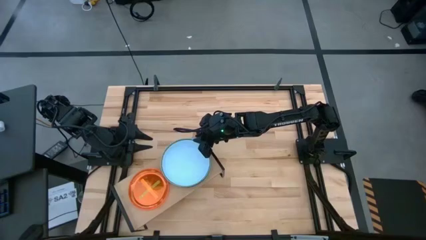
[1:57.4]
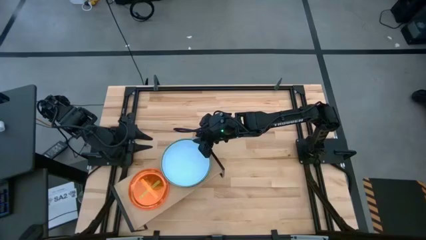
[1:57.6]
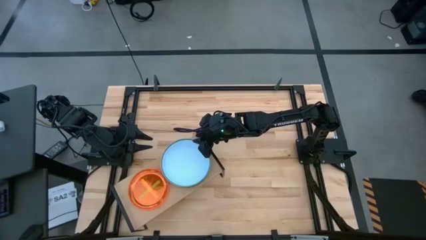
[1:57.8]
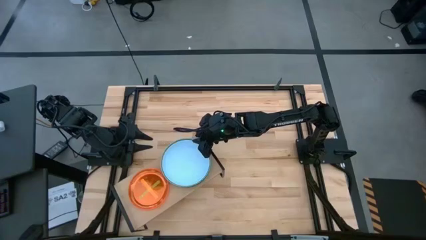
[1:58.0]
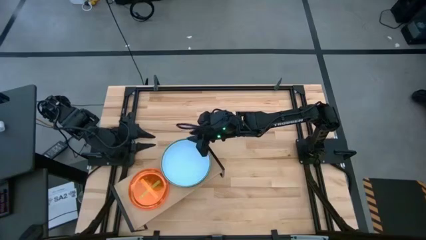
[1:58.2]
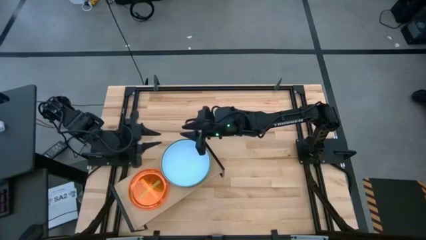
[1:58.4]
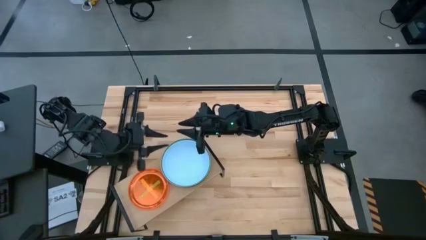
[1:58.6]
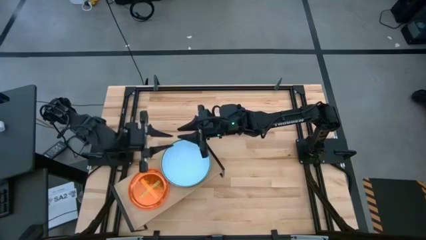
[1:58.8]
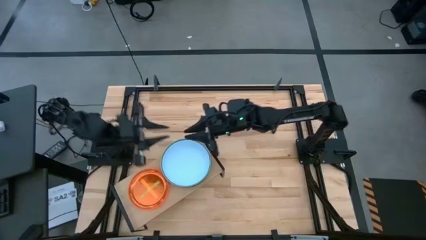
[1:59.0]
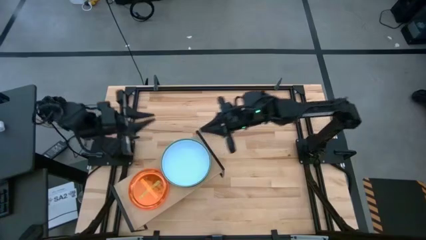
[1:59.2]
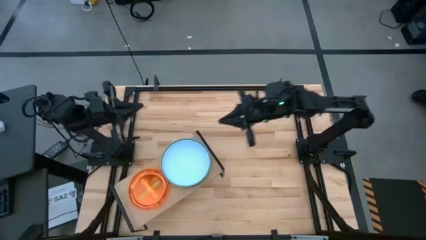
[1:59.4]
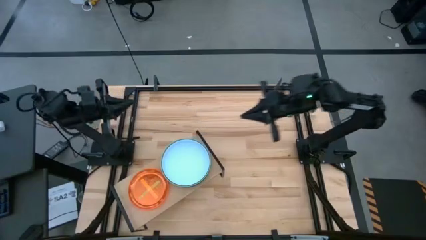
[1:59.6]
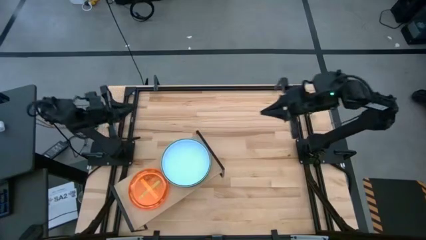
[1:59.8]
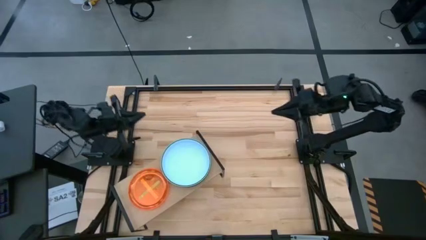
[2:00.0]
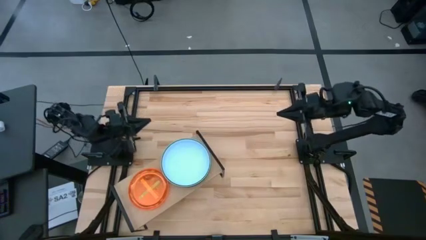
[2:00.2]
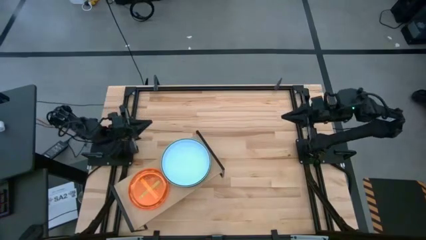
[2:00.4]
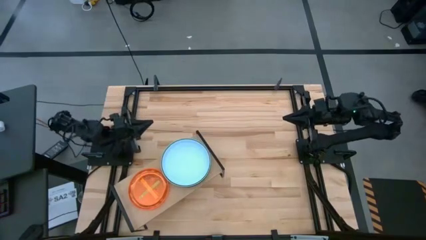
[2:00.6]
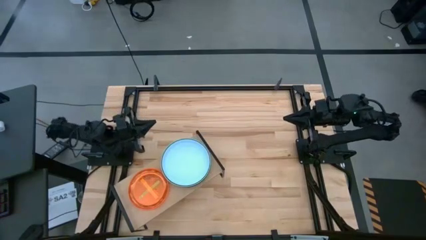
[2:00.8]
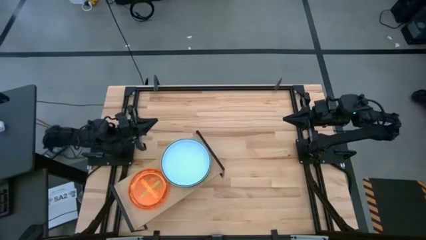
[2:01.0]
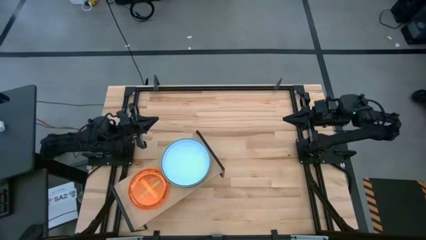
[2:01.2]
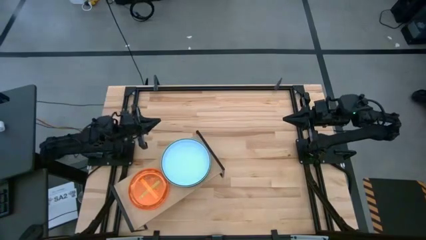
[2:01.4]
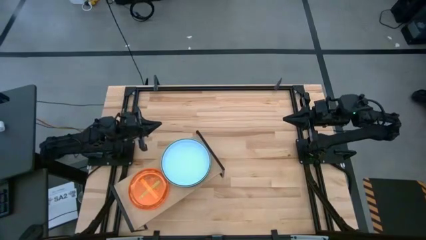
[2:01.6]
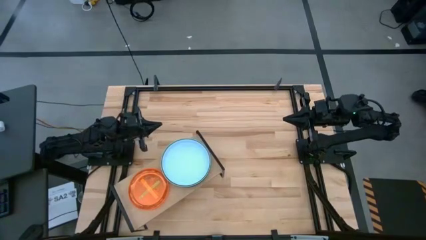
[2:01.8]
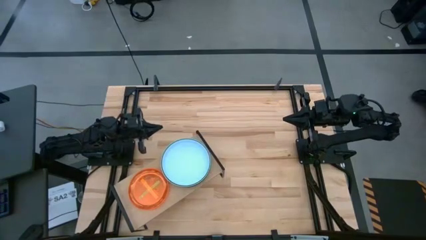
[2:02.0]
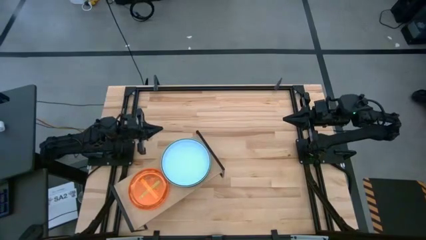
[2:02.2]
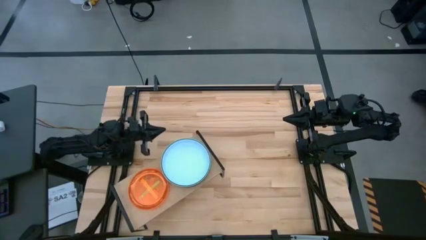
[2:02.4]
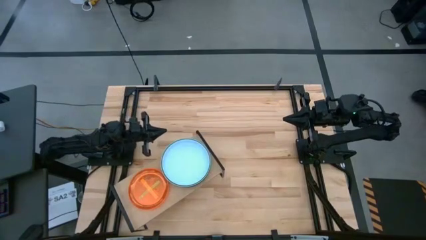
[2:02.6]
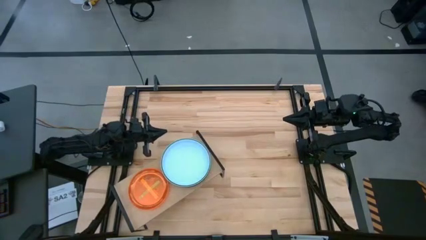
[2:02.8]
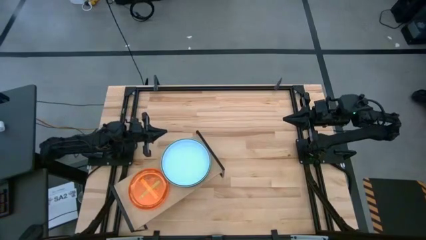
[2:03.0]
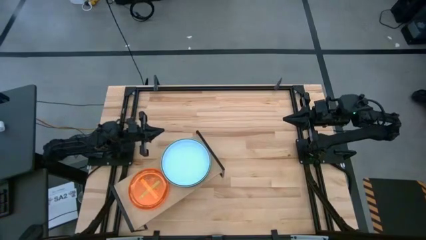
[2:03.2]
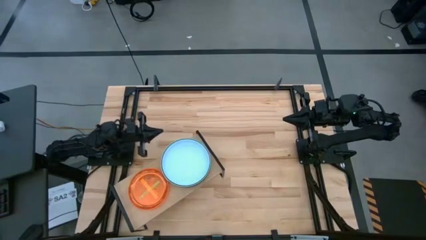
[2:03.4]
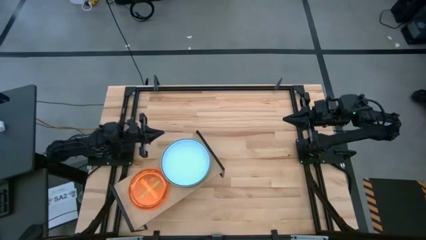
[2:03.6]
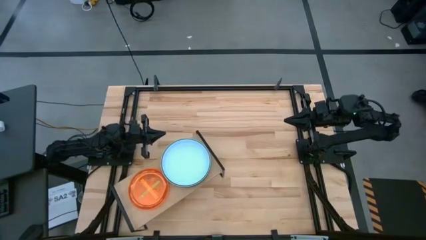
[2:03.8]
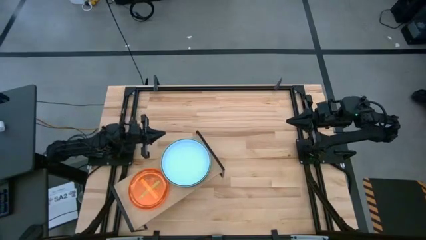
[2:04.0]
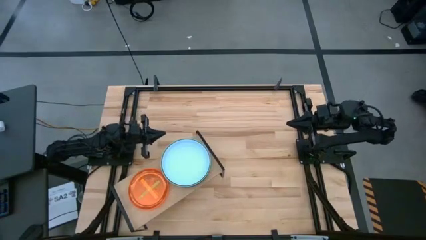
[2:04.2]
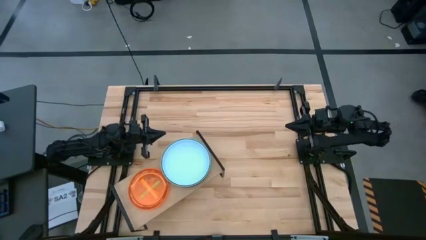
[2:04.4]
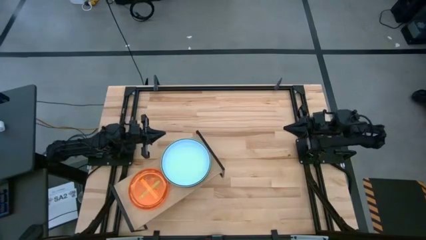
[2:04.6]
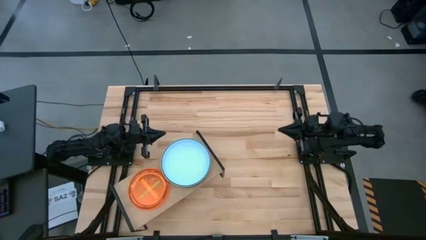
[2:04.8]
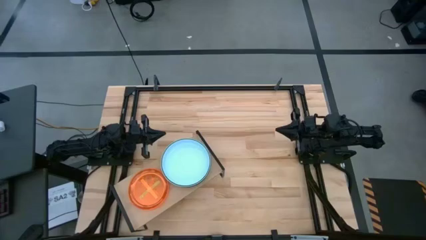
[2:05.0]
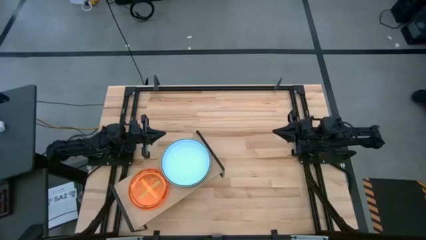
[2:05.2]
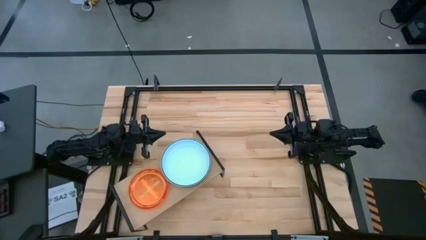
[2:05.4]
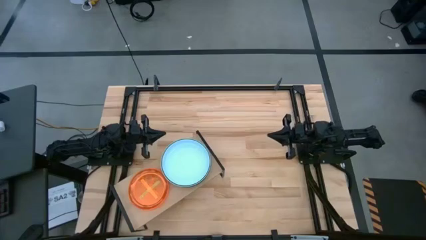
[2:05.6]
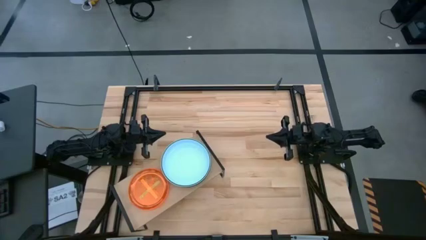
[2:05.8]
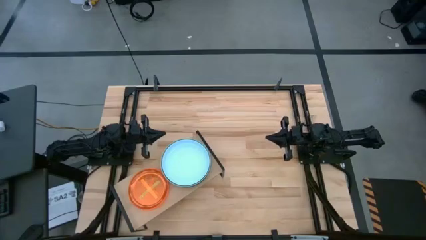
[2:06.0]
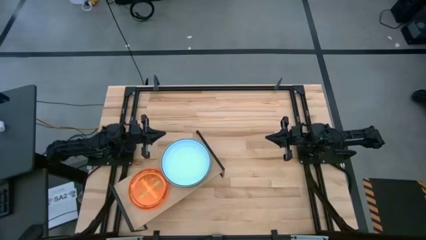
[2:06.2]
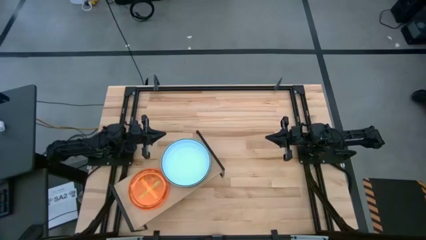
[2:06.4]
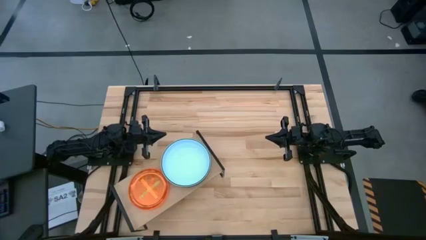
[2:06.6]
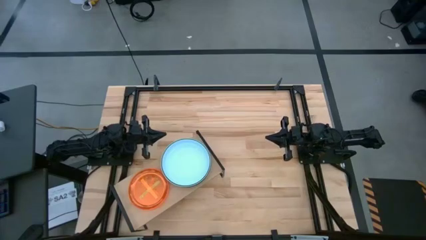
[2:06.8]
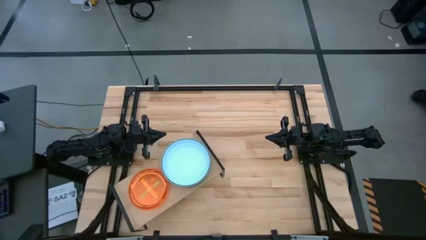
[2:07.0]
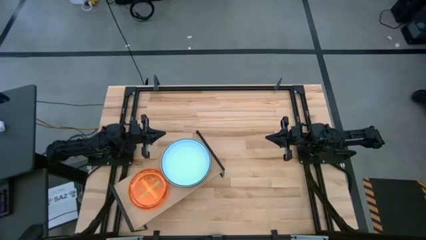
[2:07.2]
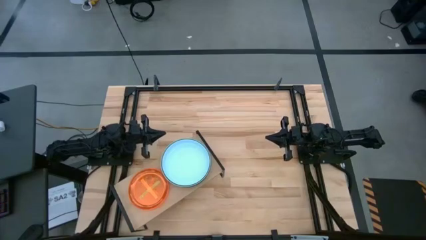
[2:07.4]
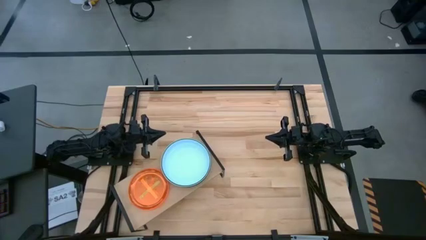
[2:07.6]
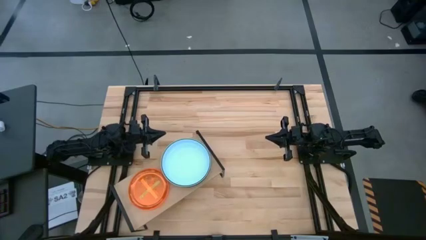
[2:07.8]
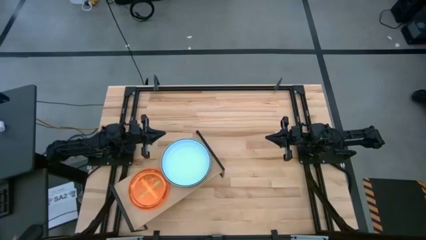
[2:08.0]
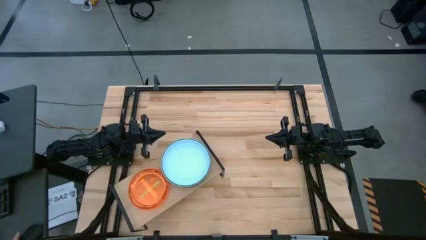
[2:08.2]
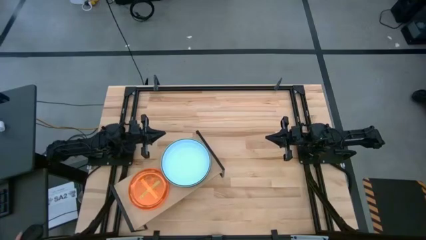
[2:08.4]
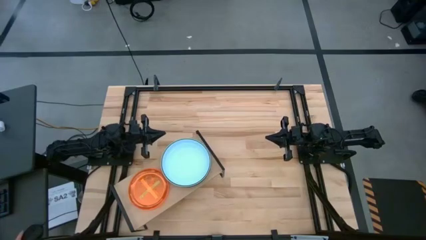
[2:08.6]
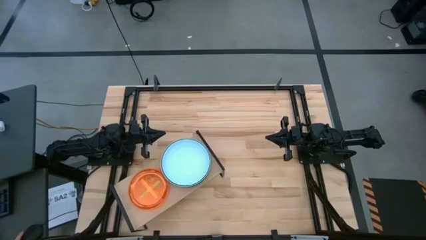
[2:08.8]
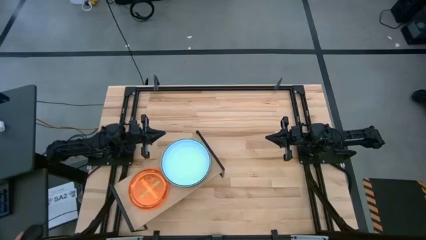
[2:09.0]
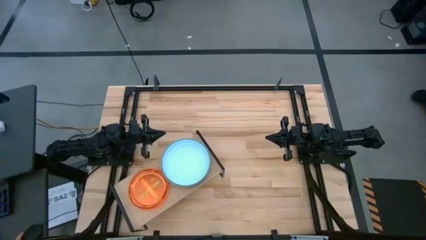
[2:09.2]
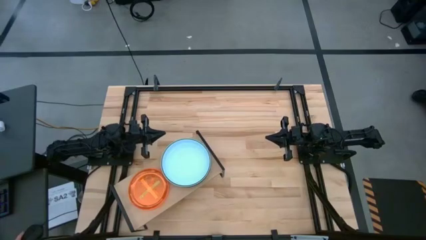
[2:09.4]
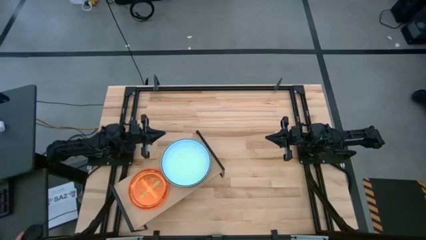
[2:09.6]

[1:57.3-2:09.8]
Task: Place and stack plates onto a shelf
Return to Home Position

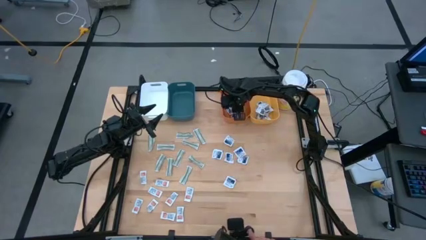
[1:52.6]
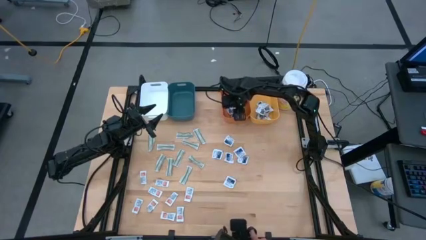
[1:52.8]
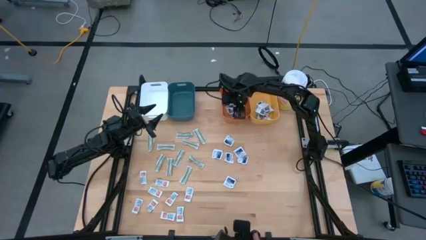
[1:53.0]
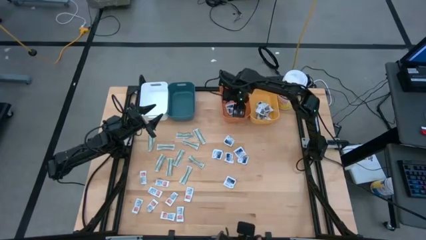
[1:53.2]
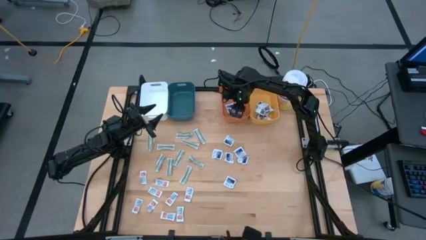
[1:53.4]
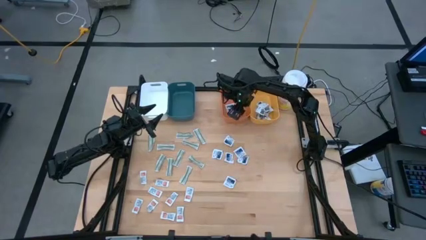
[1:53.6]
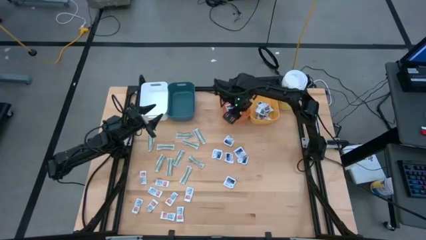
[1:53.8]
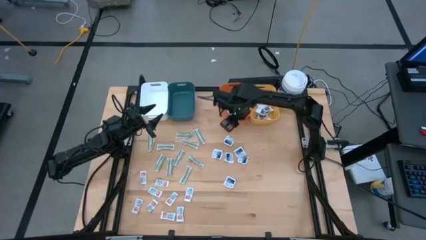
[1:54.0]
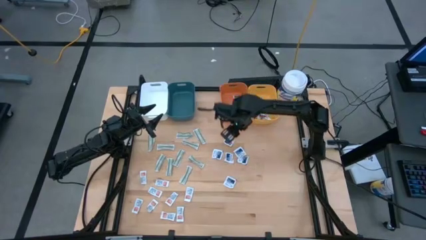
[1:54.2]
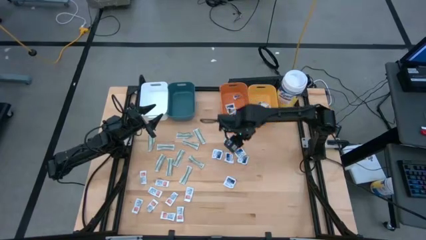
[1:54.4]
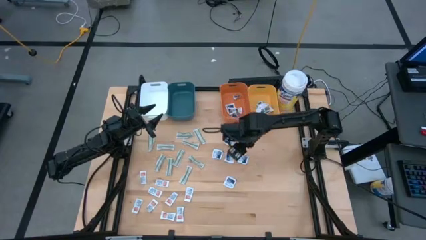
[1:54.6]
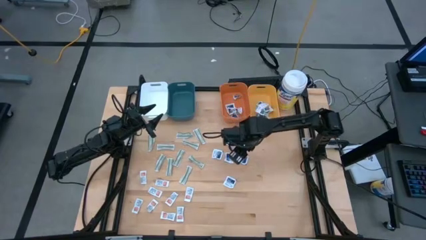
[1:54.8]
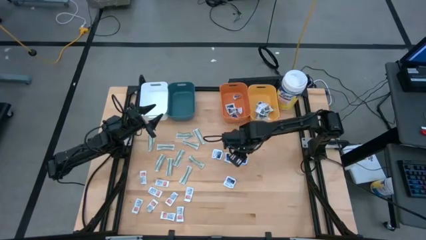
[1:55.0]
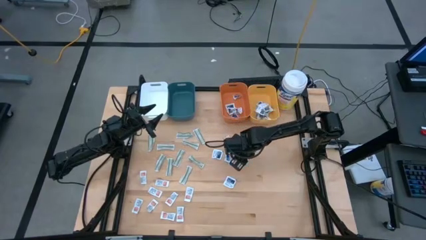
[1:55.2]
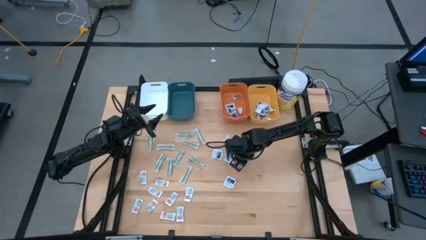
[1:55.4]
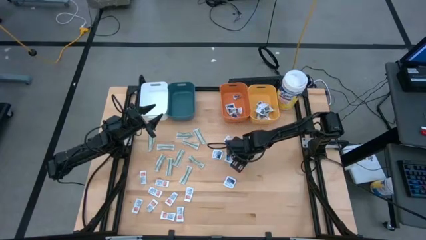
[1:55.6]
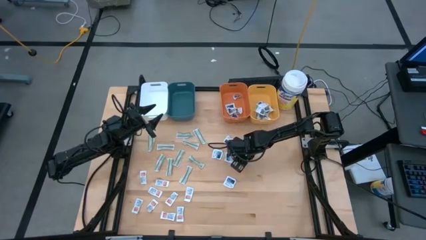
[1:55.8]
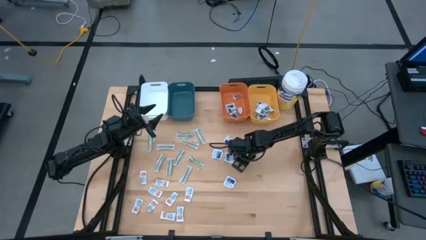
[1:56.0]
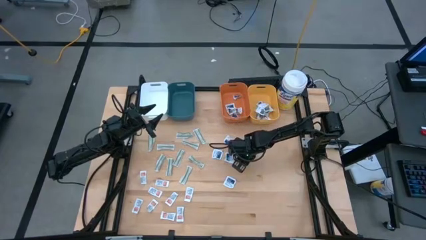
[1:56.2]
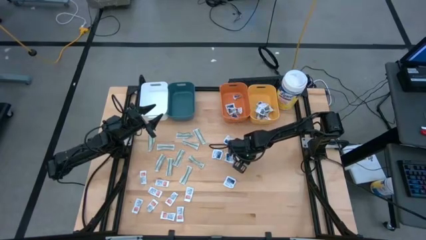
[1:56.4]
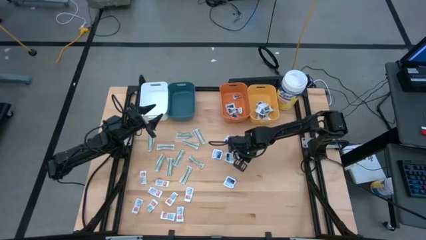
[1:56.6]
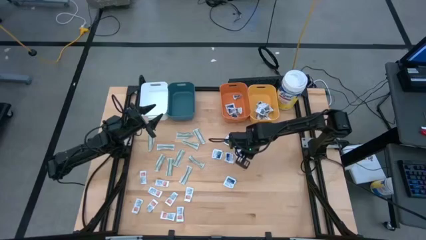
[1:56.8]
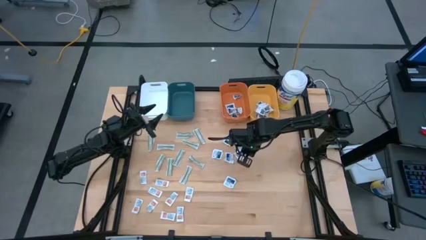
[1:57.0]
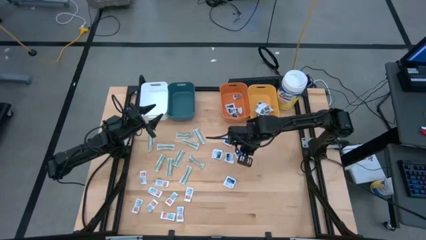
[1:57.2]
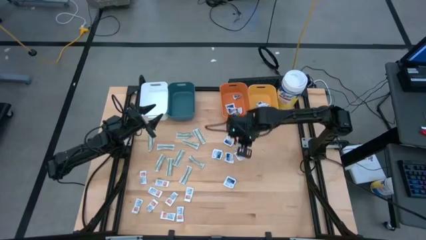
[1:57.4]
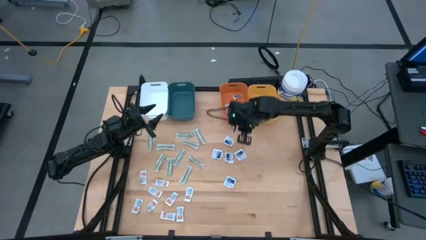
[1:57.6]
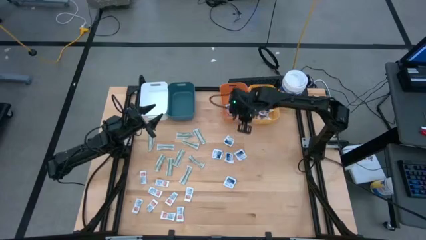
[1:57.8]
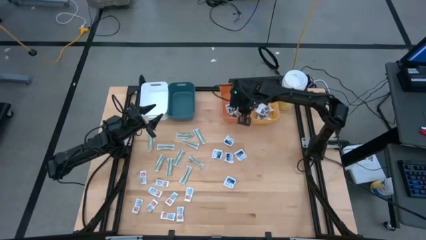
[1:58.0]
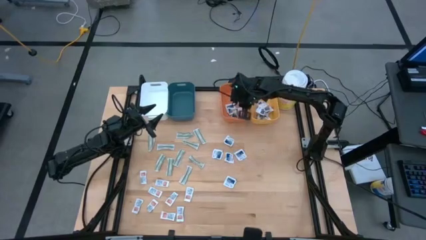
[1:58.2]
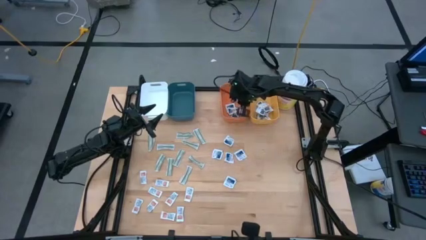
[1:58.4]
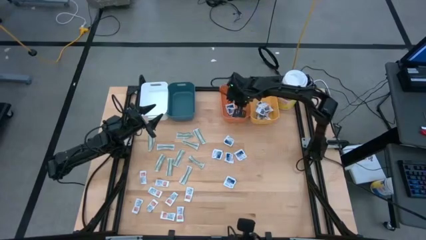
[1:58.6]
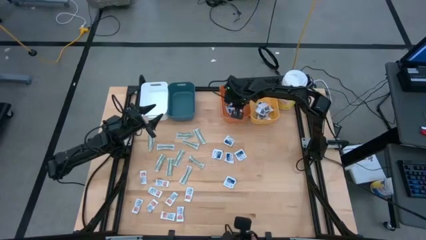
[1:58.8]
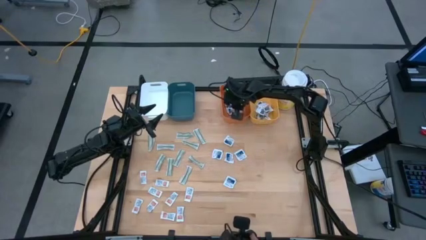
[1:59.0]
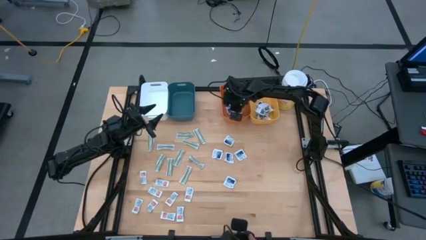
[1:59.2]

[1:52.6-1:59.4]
Task: Pick & Place First Aid Supplies
Put the alcohol pad into the orange bin
